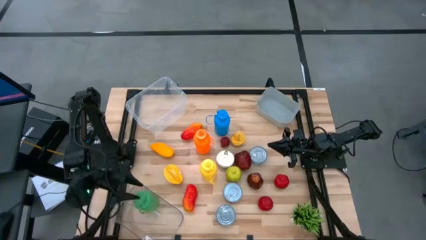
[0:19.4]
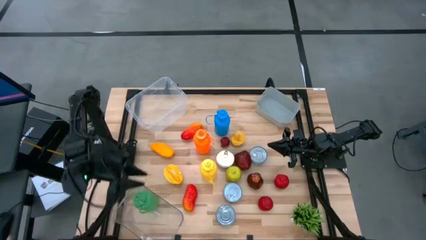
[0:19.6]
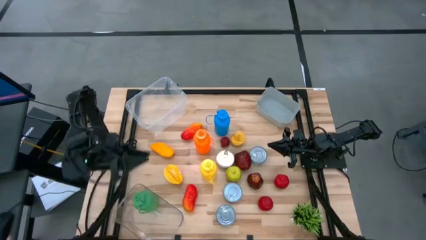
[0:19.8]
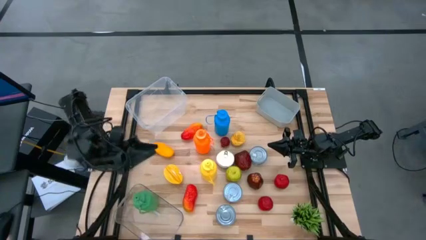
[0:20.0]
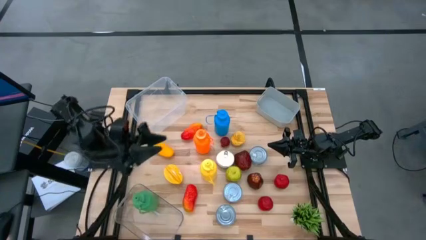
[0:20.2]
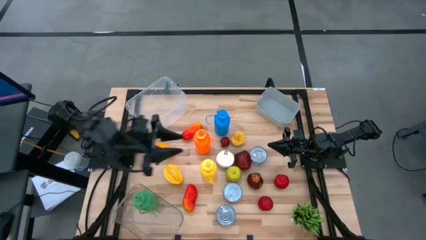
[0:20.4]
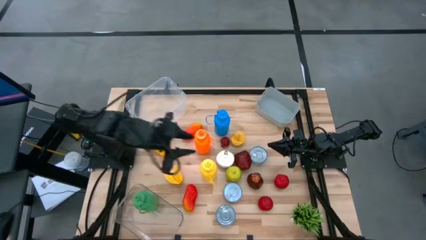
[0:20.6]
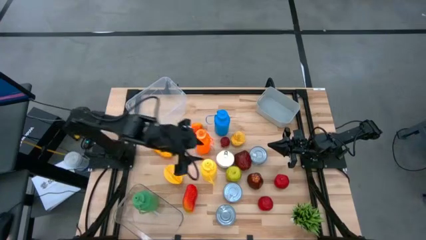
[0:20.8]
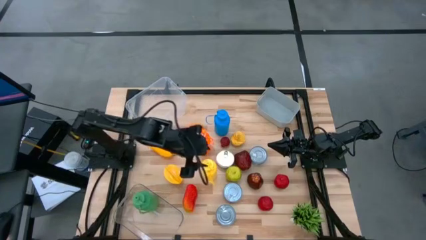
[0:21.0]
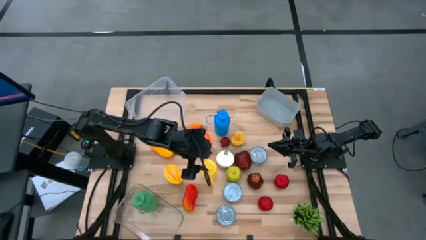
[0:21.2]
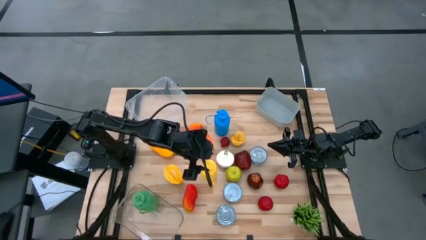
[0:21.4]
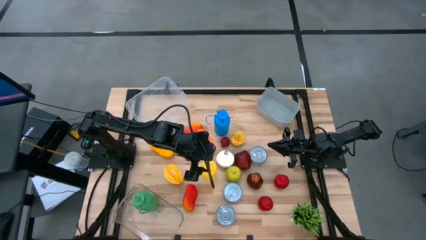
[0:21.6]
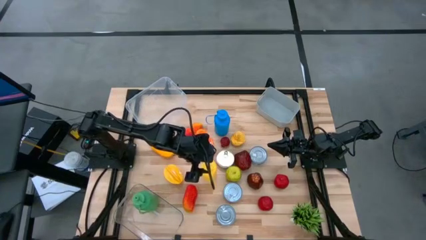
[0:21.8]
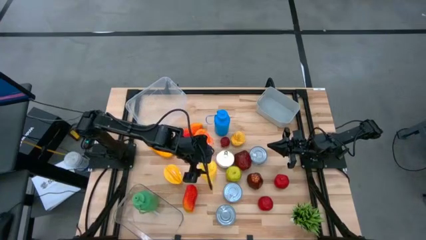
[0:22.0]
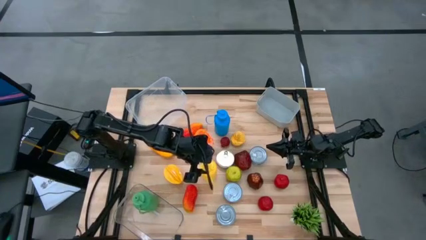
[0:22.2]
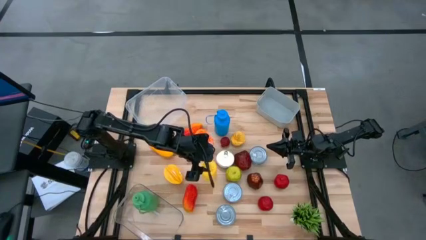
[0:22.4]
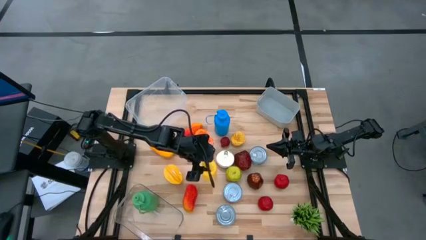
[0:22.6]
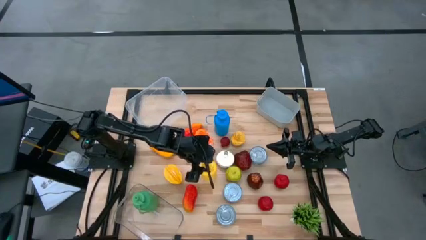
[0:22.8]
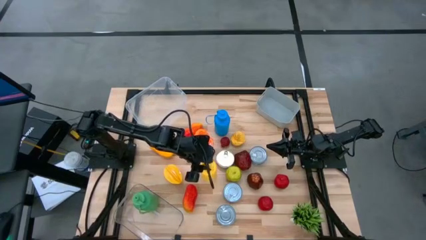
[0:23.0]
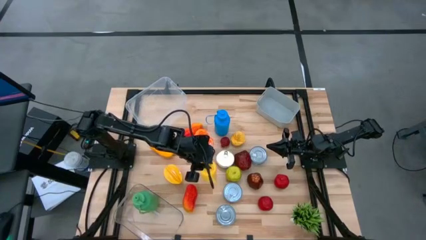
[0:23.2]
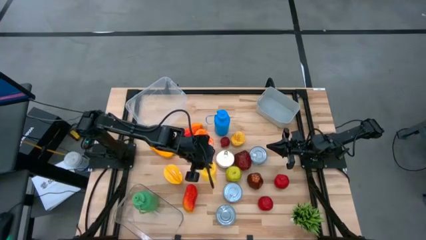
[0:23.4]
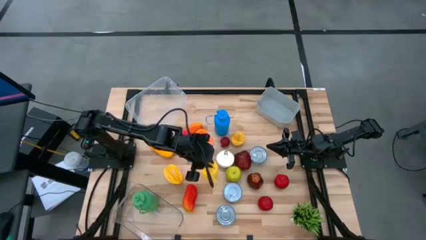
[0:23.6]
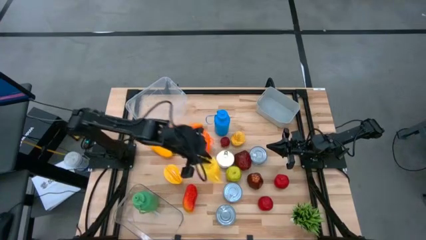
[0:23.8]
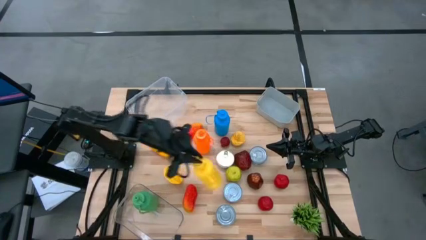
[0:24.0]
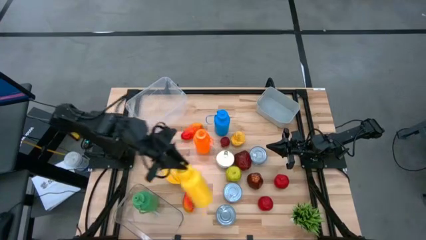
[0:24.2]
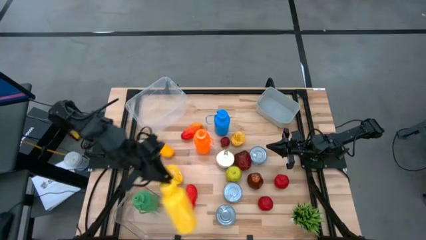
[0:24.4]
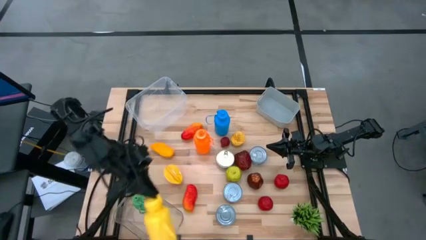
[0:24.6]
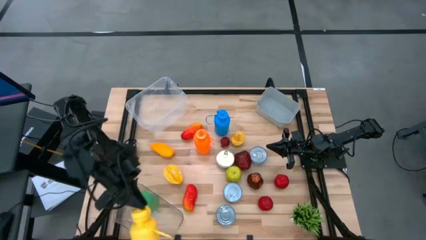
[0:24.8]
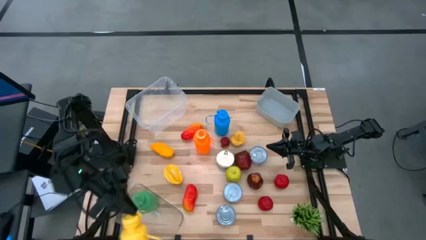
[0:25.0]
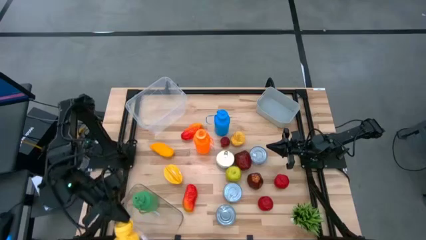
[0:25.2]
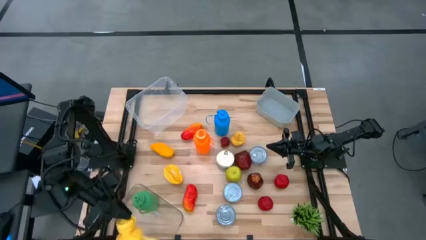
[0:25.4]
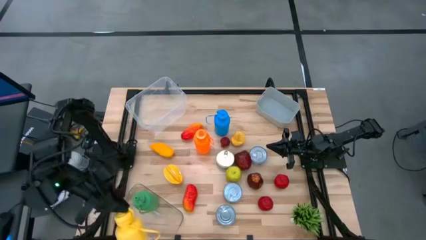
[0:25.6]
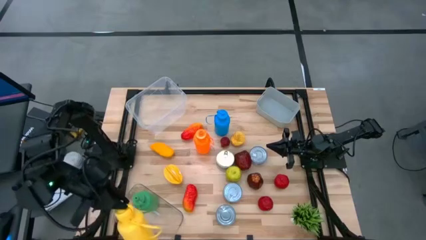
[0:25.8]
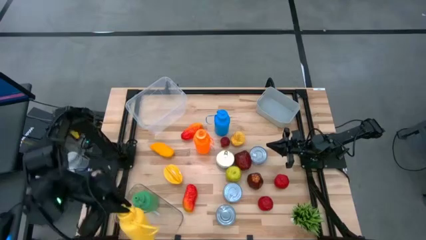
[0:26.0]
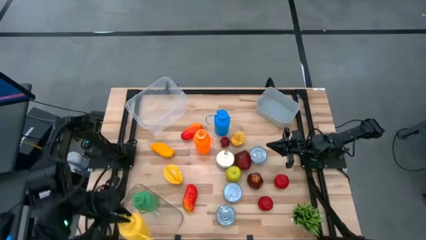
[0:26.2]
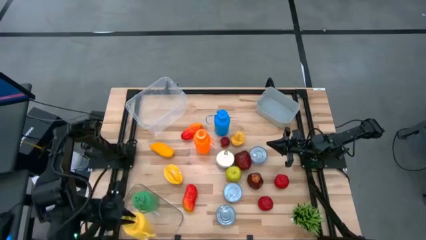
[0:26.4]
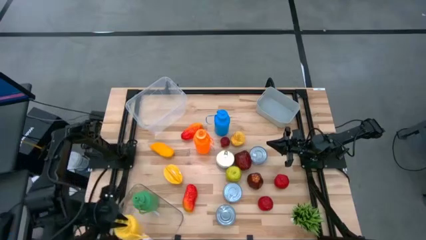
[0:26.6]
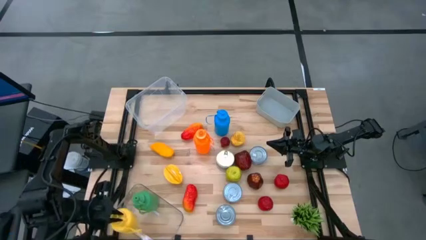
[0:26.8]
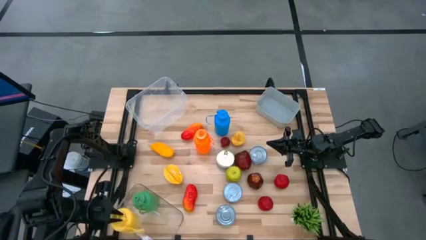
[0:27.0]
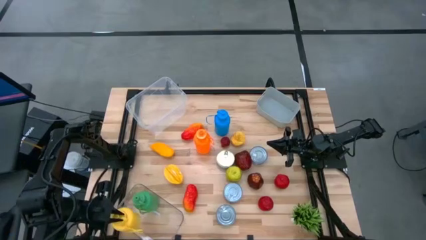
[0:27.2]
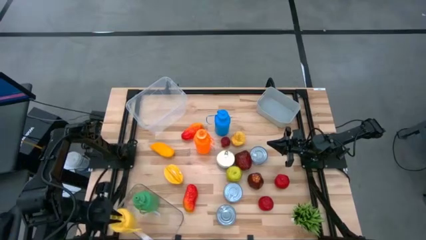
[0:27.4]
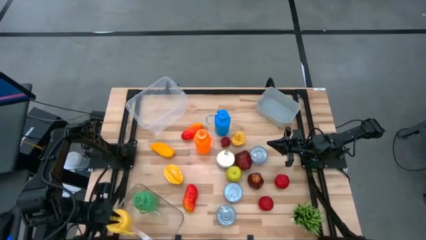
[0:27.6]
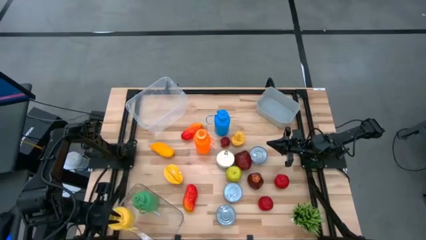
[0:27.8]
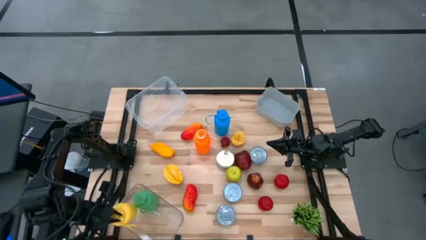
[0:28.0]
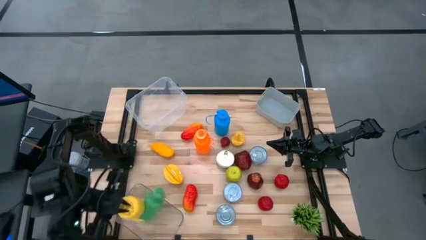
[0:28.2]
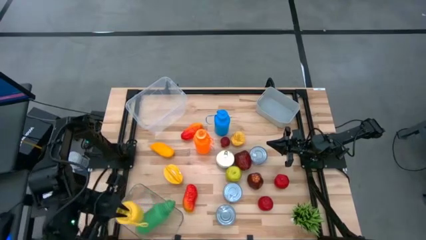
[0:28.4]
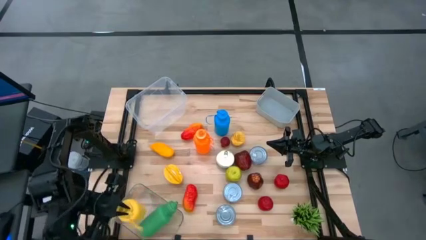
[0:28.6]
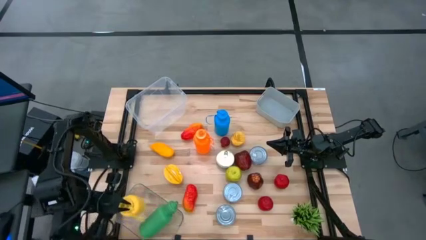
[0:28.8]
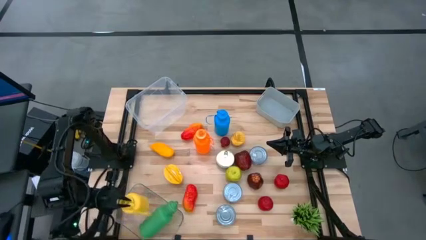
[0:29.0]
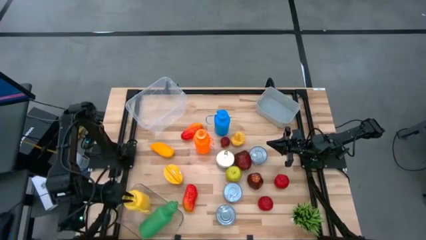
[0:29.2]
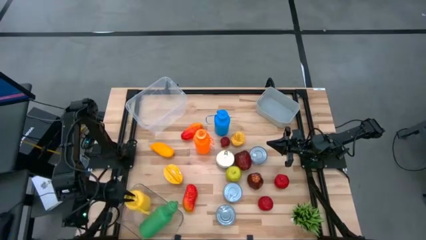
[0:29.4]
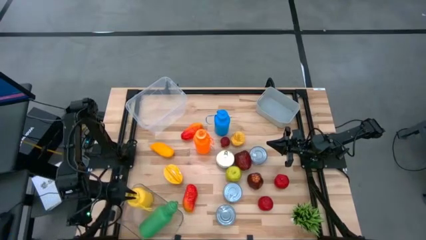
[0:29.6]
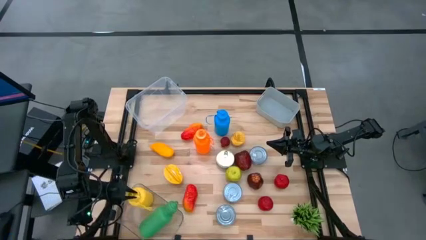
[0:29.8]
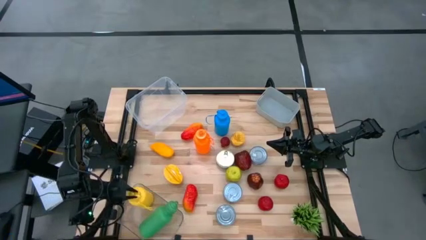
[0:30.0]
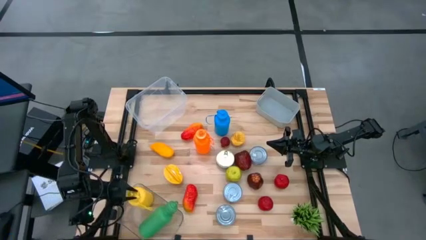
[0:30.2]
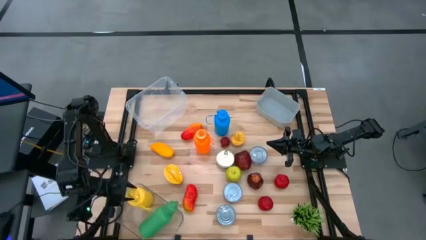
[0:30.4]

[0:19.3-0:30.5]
Task: Pick & Place Food Item
Put the yellow water bottle into the transparent bin

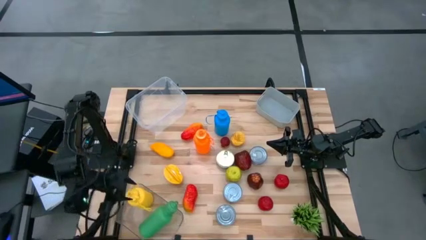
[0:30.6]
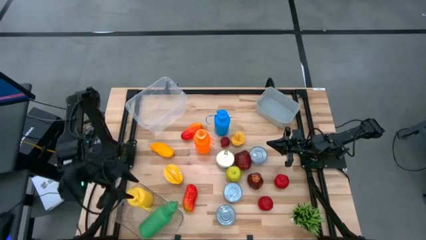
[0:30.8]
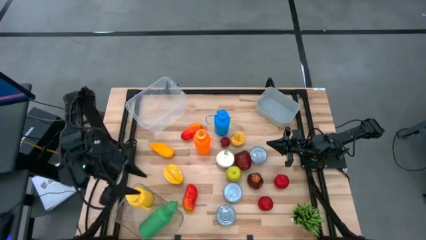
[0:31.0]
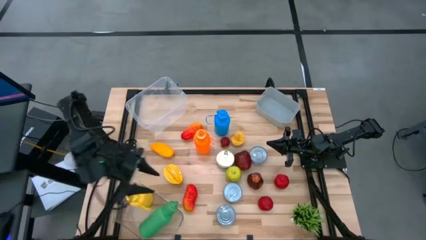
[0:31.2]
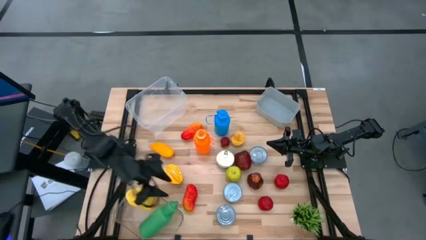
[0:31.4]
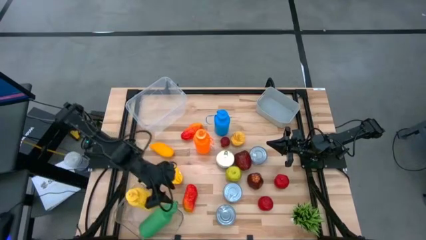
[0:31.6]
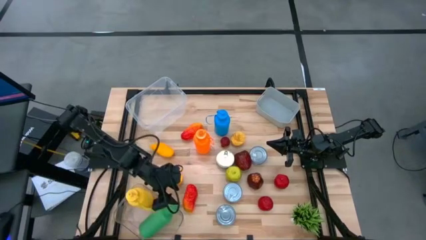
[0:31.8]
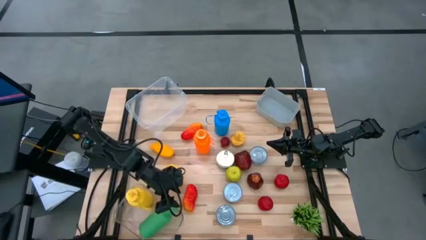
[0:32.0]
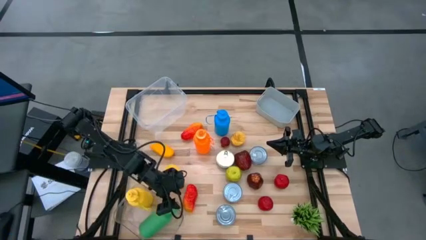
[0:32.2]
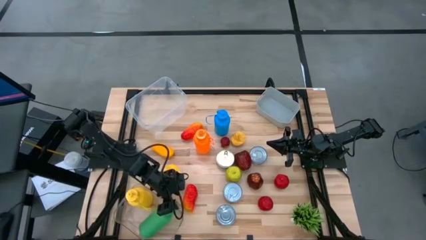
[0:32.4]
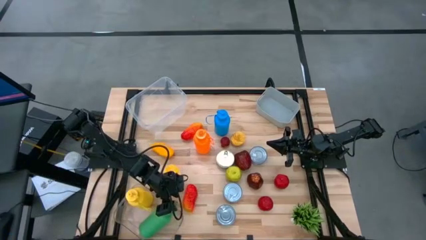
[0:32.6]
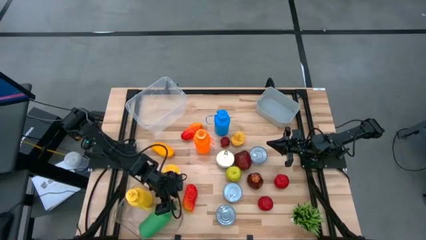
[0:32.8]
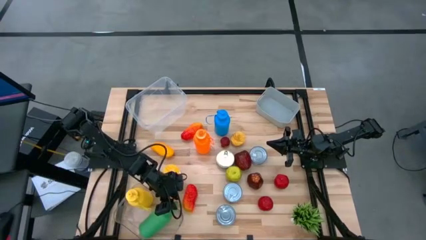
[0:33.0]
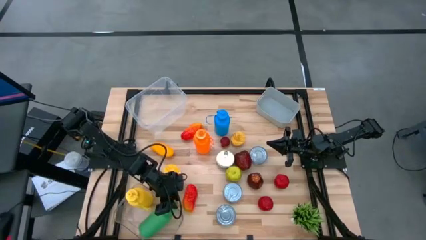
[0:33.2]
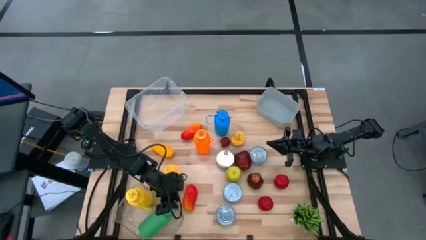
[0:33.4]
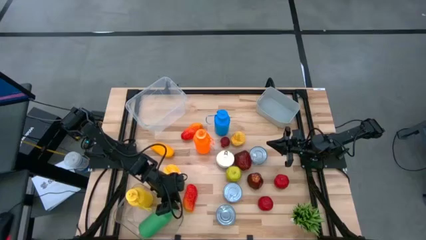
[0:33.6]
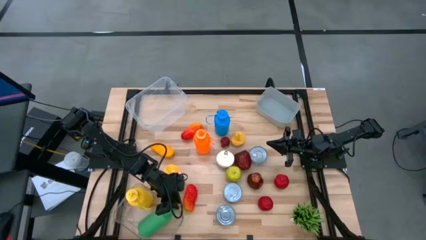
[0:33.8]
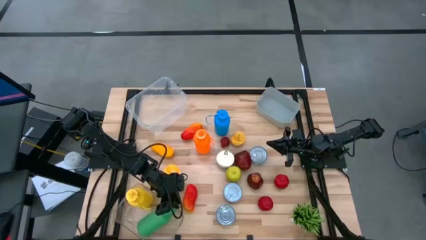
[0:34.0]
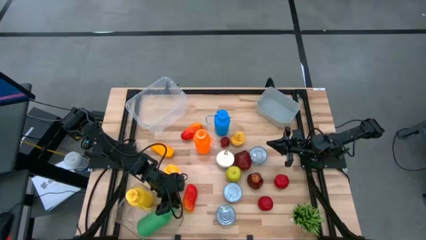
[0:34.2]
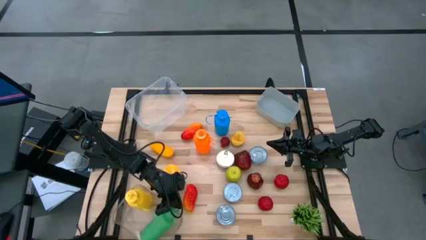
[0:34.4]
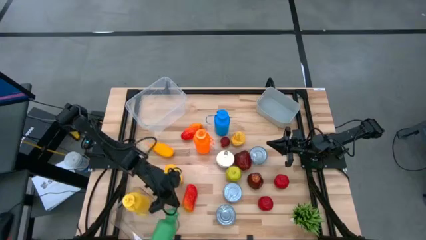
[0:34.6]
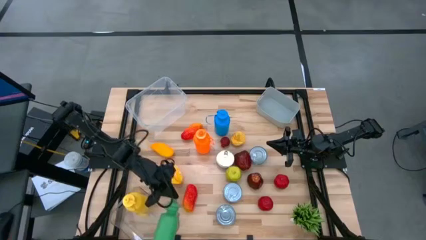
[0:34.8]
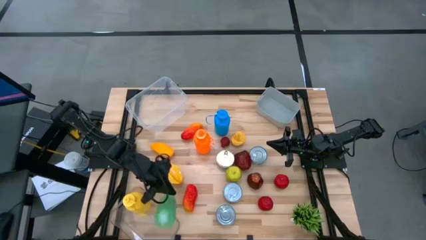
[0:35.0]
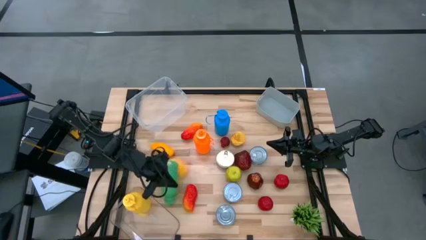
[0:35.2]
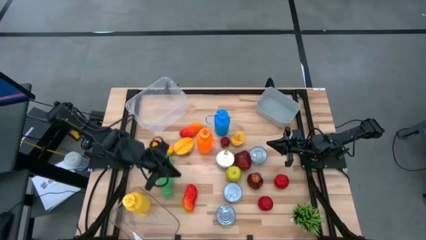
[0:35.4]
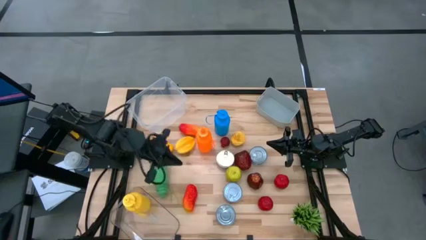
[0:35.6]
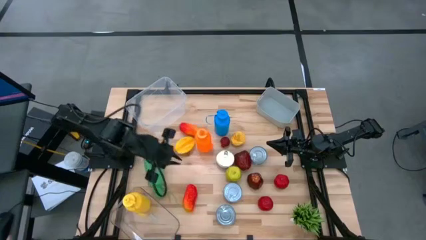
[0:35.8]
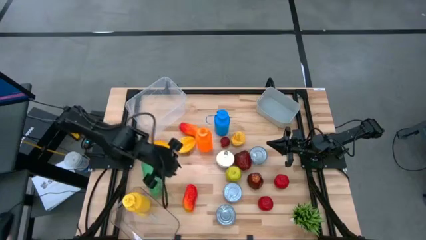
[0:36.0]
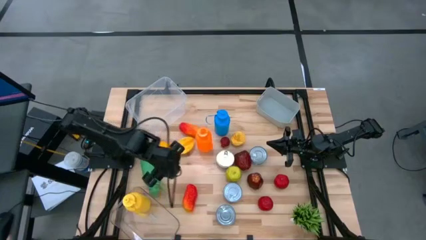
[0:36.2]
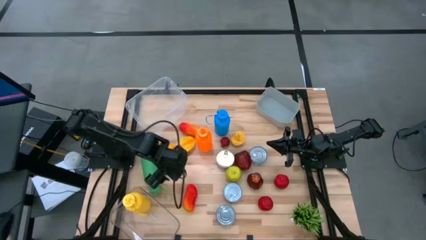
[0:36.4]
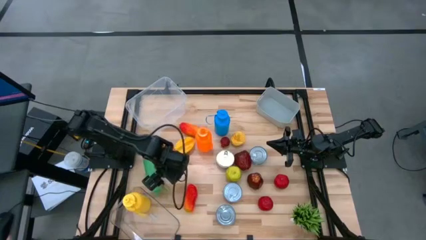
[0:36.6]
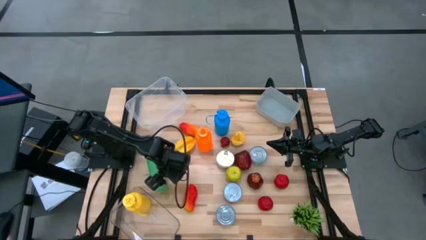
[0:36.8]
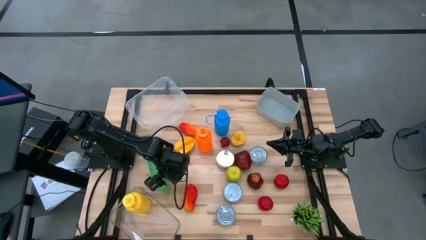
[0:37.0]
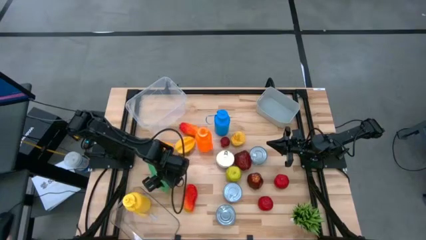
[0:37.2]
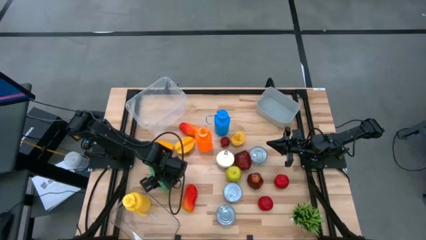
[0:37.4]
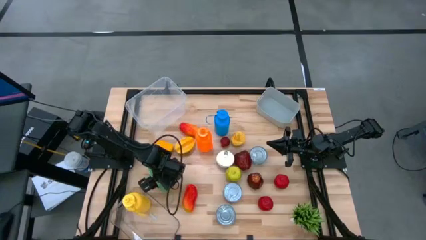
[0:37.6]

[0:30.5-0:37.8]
Put the green water bottle into the transparent bin
